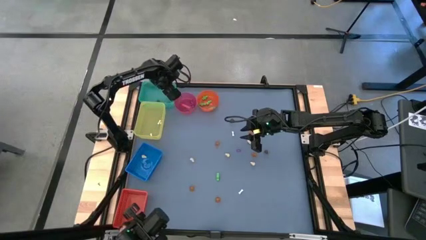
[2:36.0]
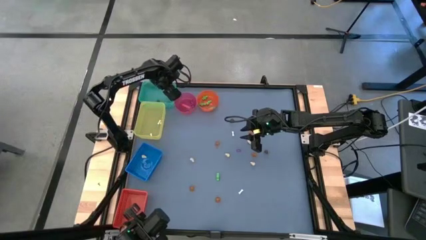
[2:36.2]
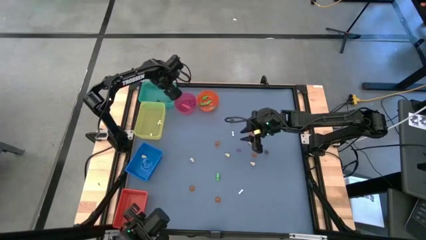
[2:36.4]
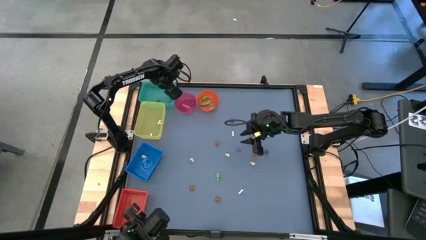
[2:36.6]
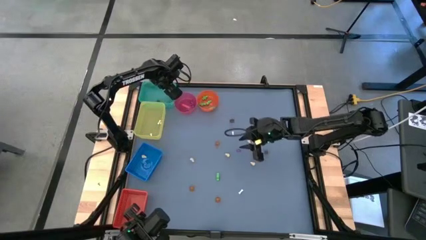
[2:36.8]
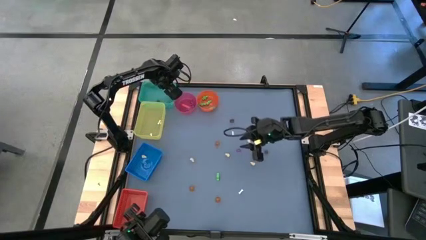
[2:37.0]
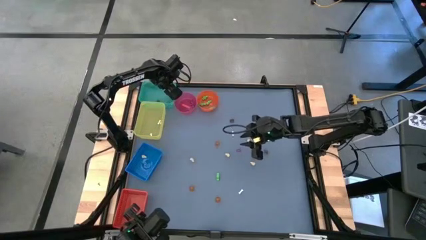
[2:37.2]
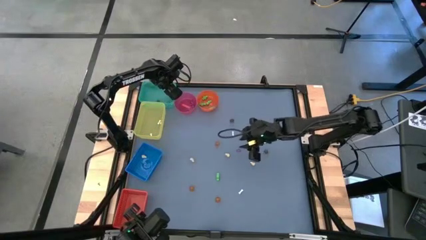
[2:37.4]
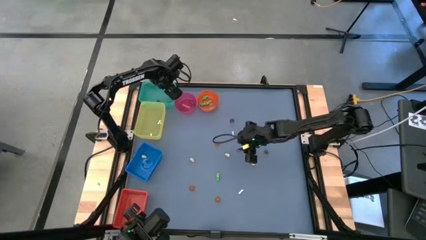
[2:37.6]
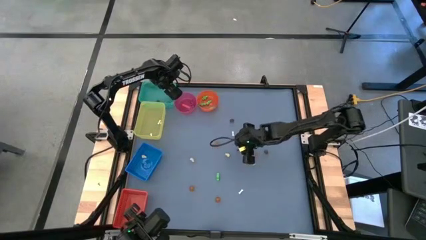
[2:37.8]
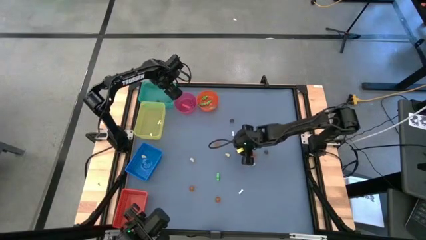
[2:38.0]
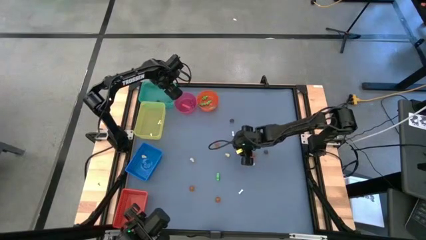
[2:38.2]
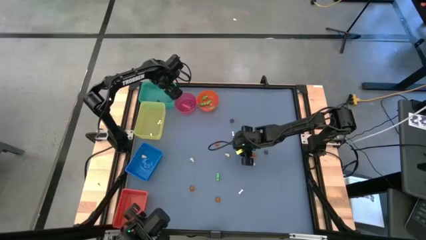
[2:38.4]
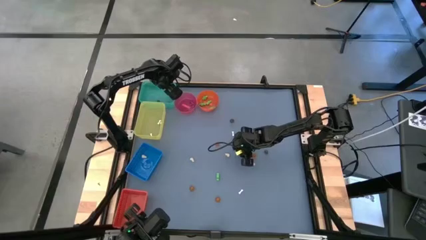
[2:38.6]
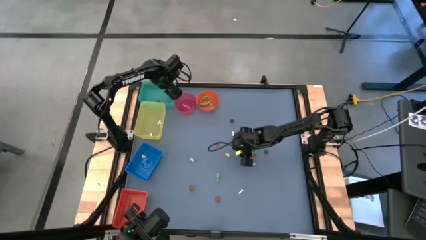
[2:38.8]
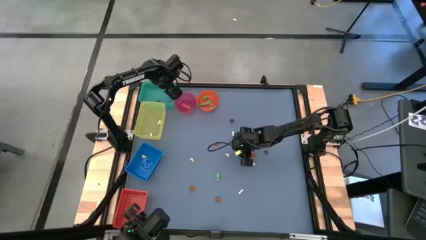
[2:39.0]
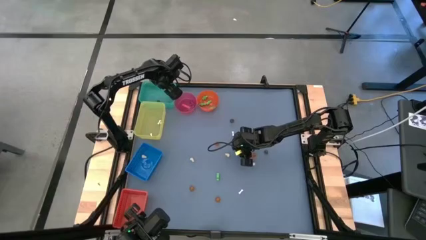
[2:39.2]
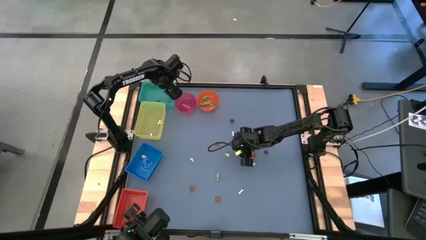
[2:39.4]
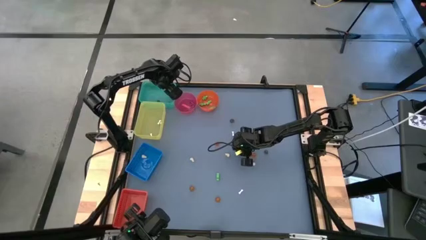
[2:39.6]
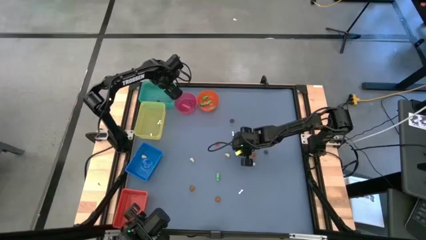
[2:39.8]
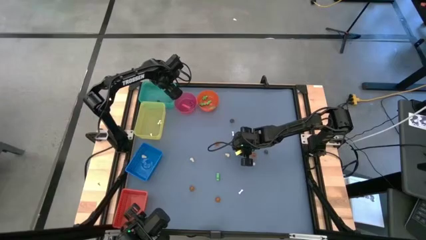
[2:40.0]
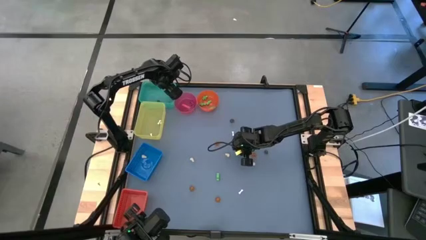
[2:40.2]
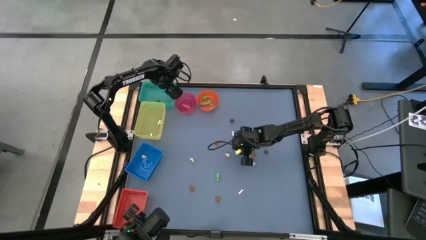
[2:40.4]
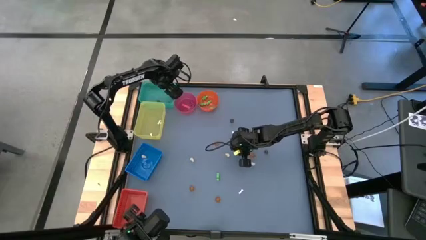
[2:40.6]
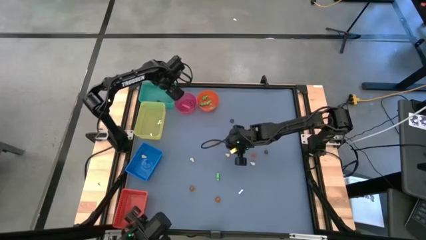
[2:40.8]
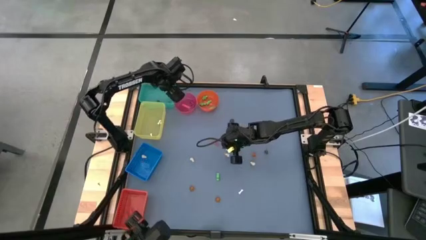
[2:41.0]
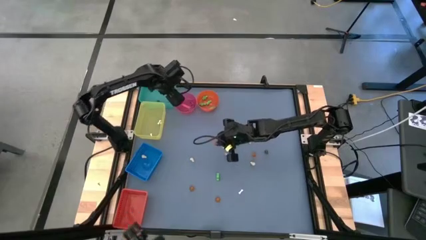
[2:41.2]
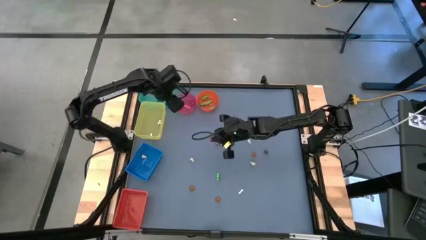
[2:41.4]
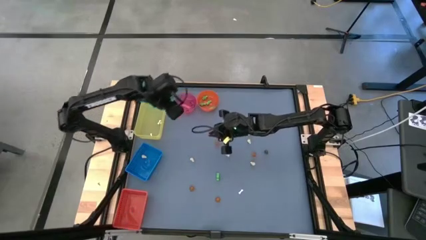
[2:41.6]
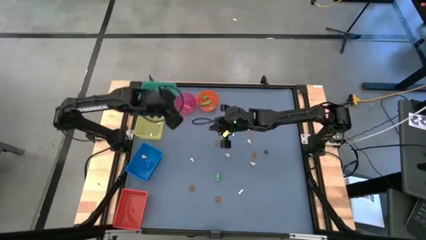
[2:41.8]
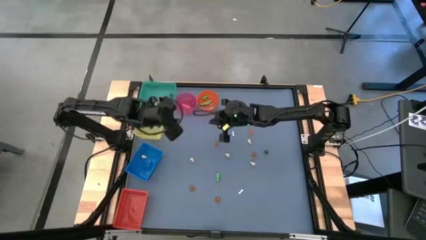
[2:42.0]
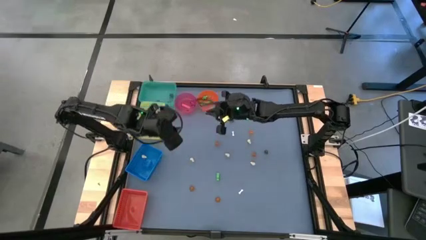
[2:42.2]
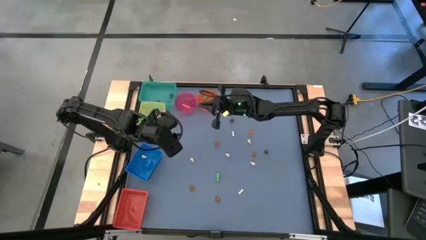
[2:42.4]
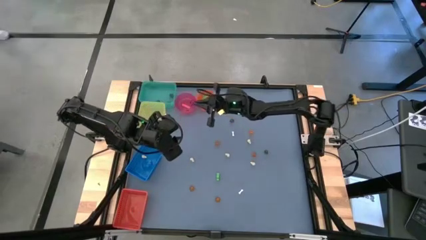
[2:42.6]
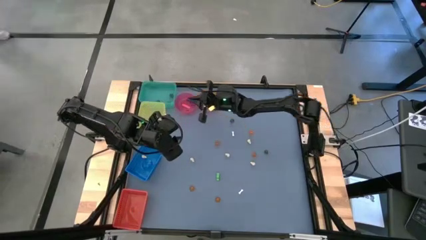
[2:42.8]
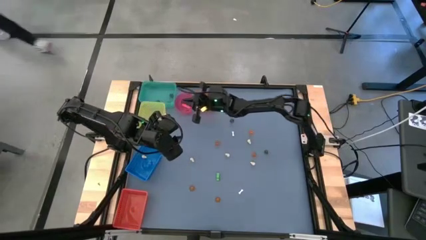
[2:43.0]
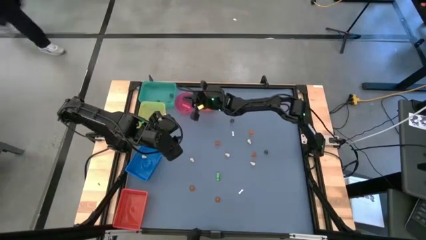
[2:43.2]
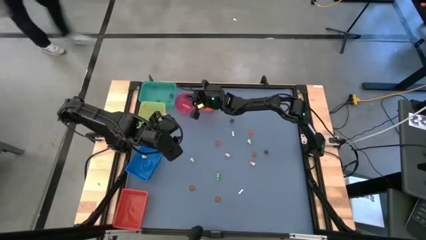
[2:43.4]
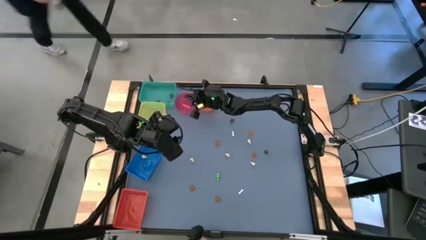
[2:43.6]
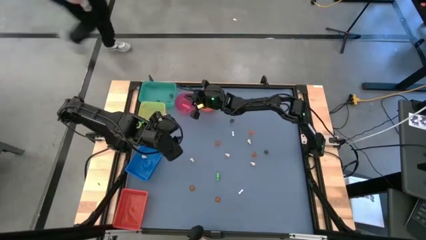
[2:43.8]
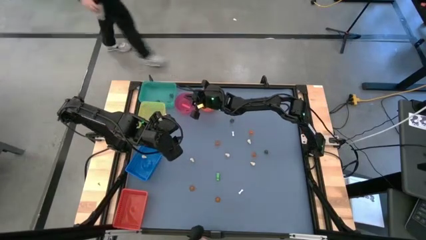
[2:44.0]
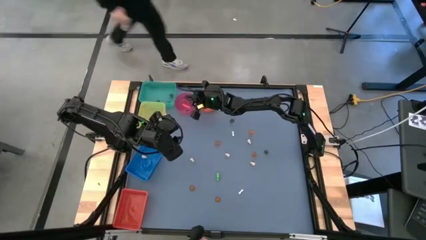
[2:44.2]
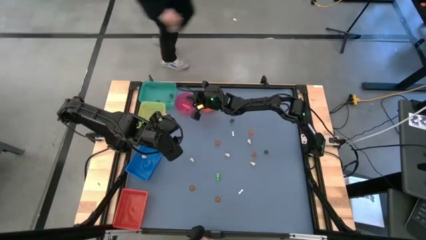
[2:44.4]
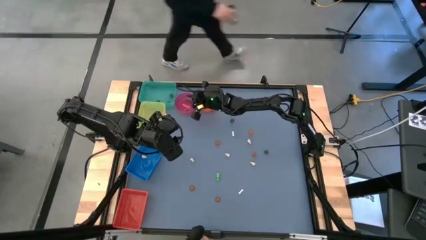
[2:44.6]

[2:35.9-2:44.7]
Task: Sort Halloween decoration
Put the purple witch hat toy into the pink bin

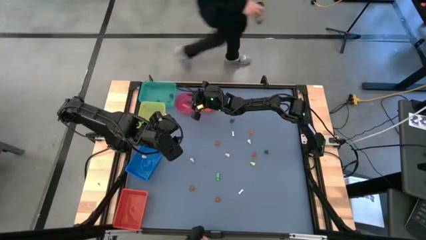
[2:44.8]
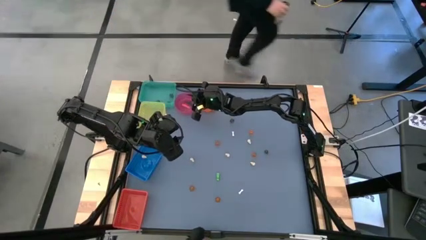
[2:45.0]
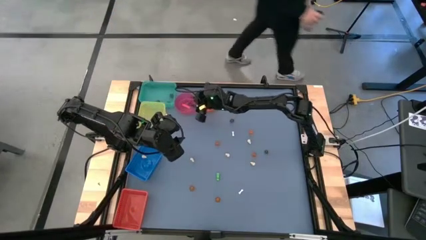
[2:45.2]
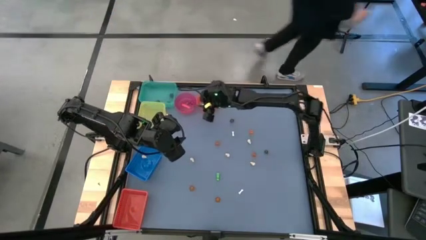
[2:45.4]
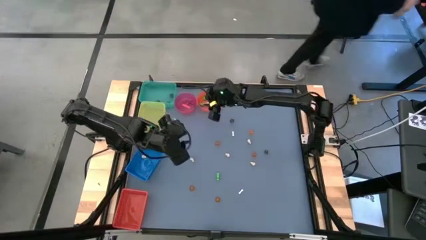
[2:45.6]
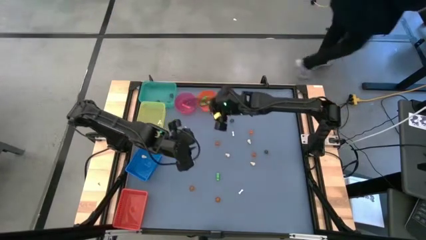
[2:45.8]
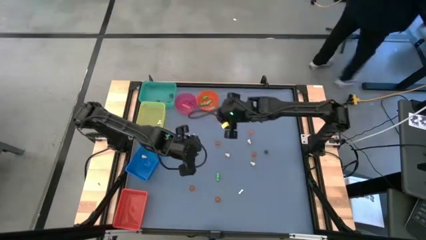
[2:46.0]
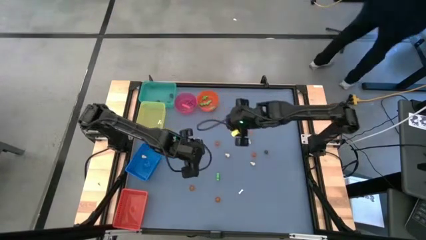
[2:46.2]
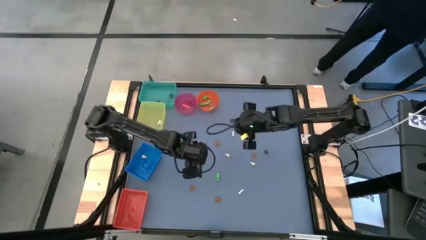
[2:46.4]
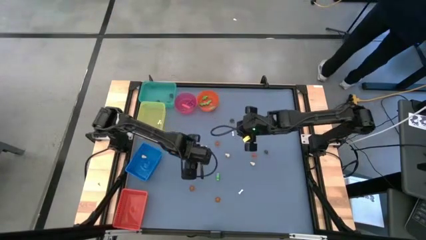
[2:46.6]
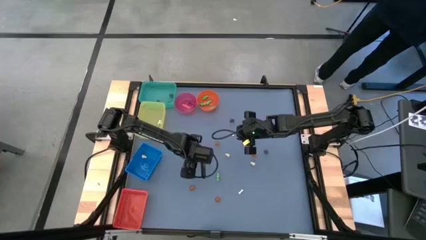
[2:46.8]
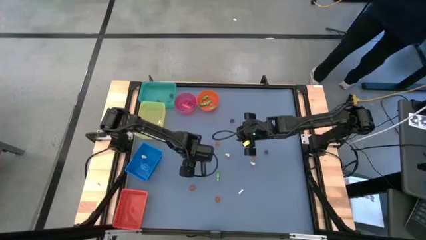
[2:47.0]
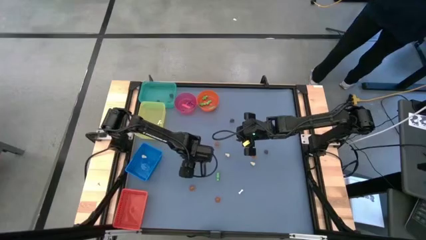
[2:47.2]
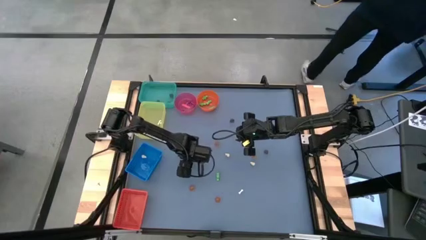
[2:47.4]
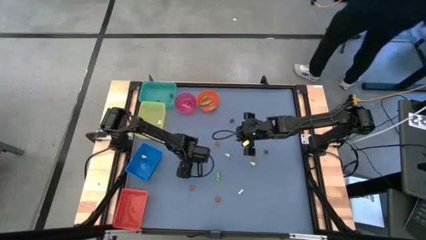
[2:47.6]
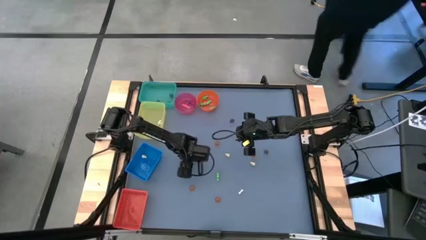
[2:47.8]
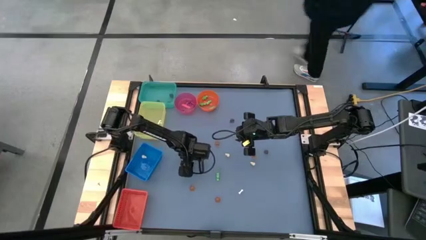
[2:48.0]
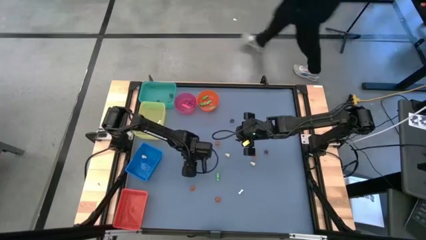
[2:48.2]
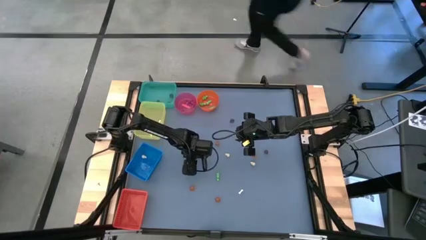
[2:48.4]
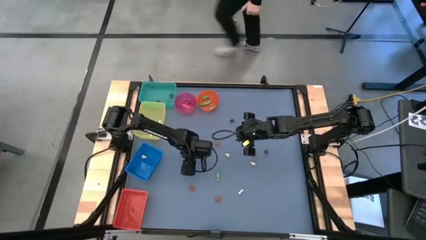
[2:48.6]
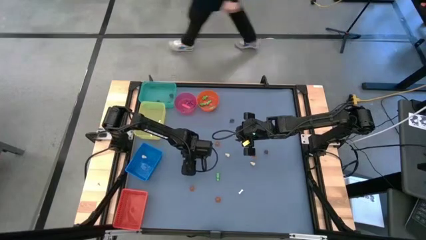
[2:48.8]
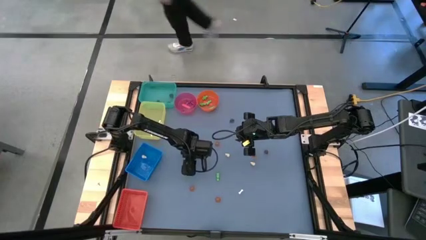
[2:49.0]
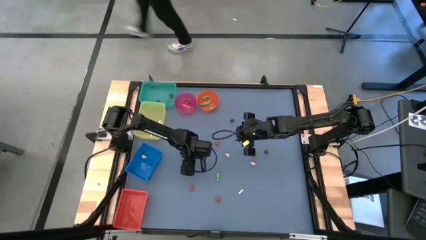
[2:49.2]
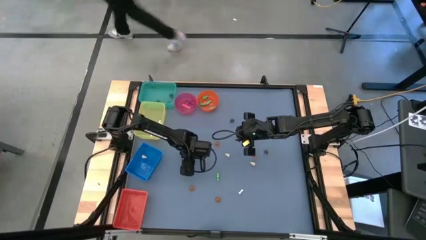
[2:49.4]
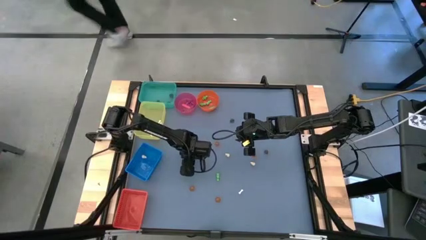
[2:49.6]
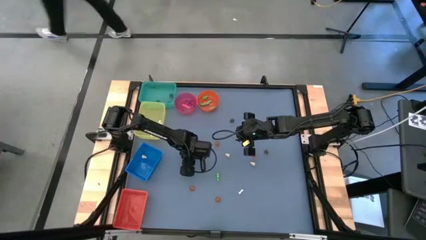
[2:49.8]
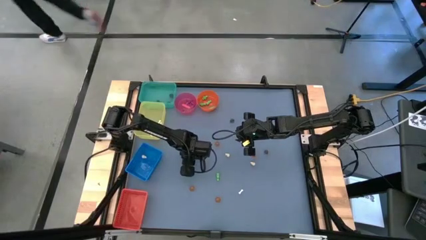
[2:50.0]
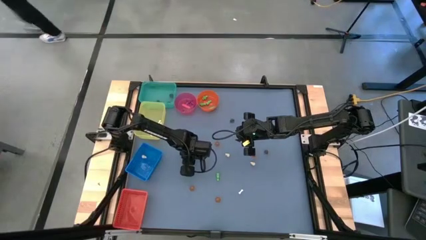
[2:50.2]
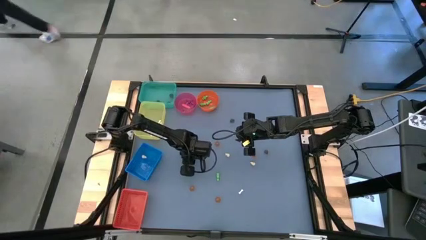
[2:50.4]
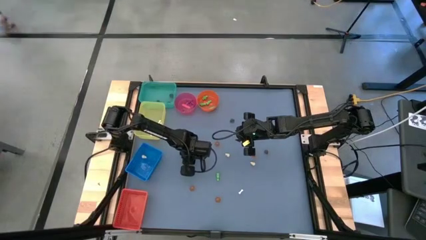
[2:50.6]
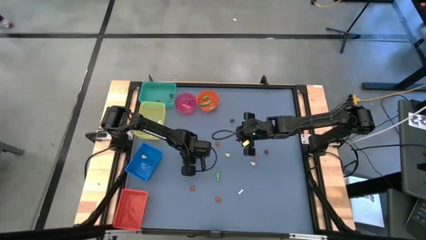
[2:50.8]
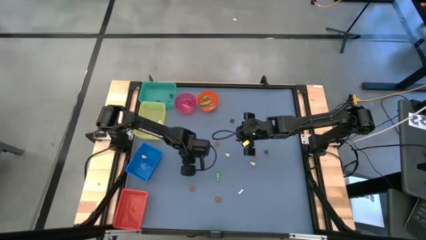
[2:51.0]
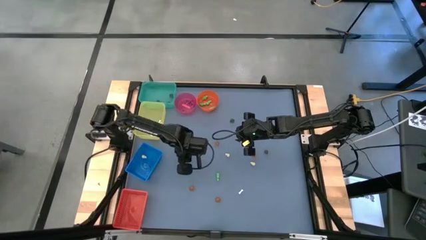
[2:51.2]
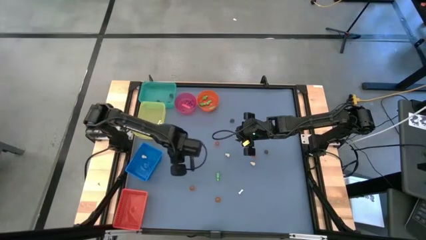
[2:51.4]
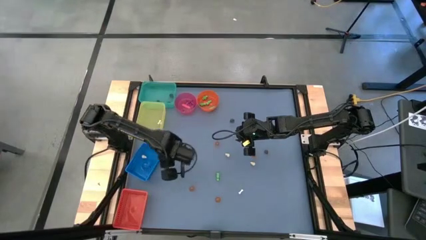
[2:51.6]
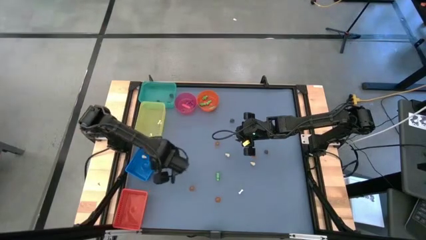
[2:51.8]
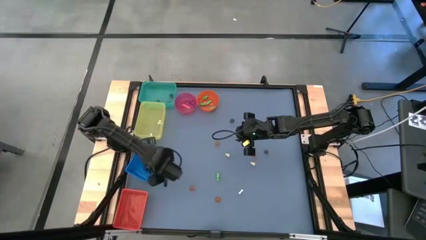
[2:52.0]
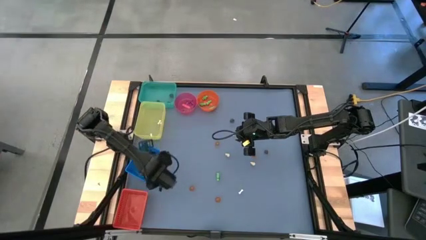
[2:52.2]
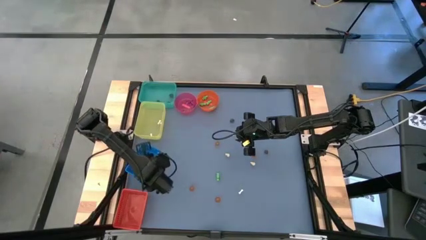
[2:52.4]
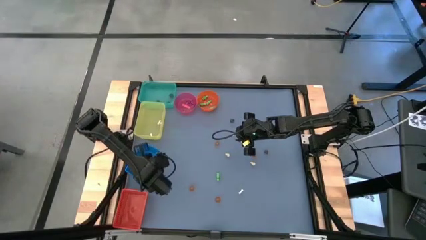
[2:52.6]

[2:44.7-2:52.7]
Put the yellow skull toy into the blue bin
